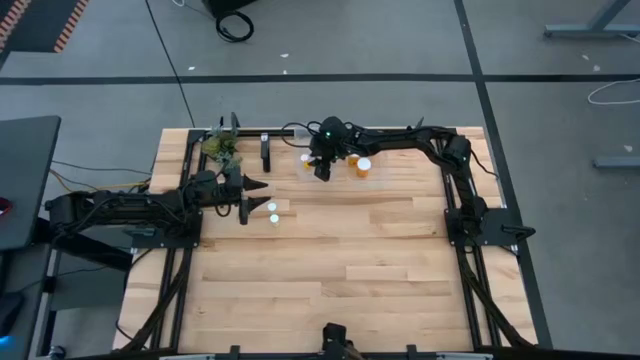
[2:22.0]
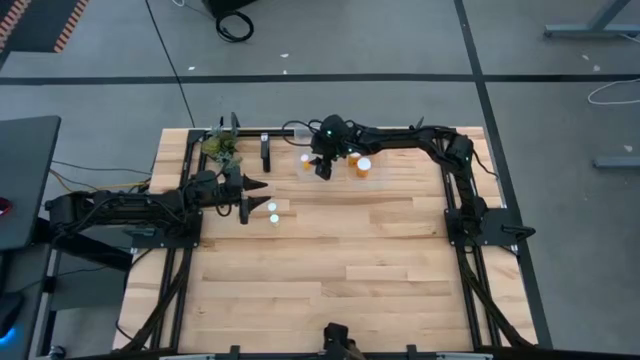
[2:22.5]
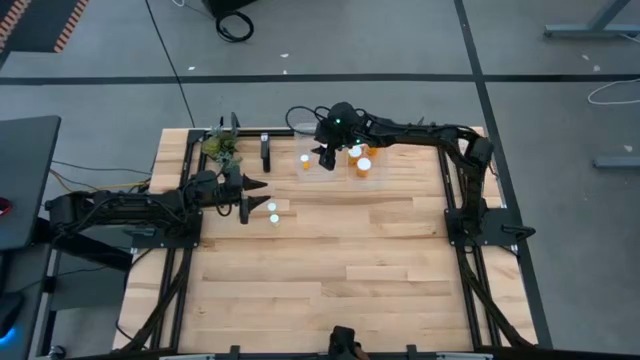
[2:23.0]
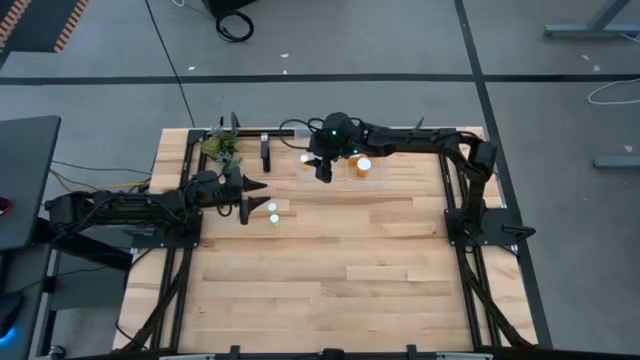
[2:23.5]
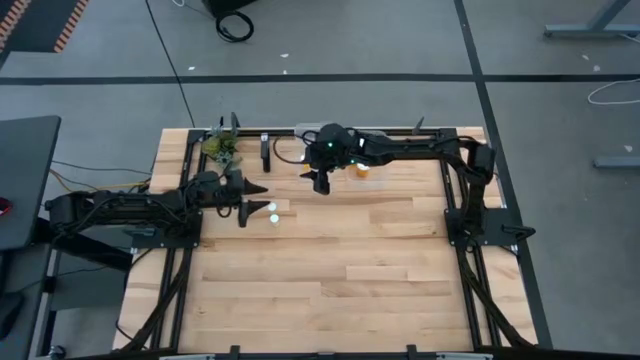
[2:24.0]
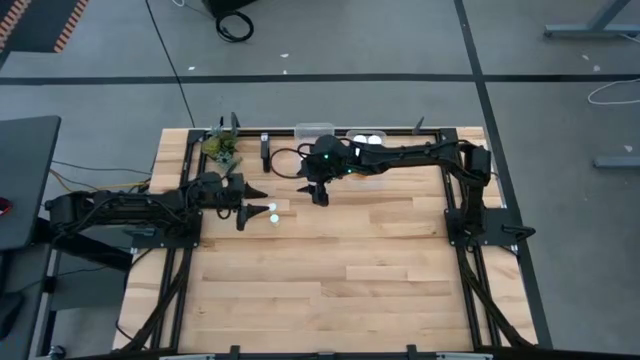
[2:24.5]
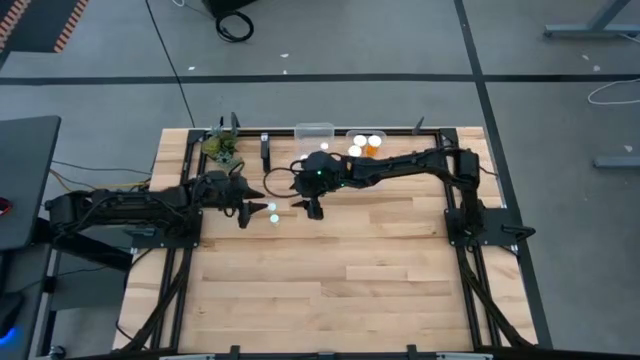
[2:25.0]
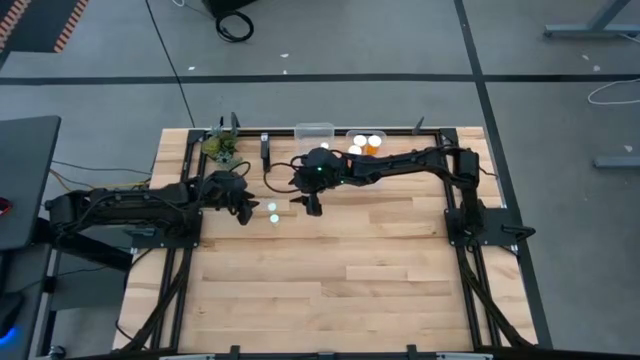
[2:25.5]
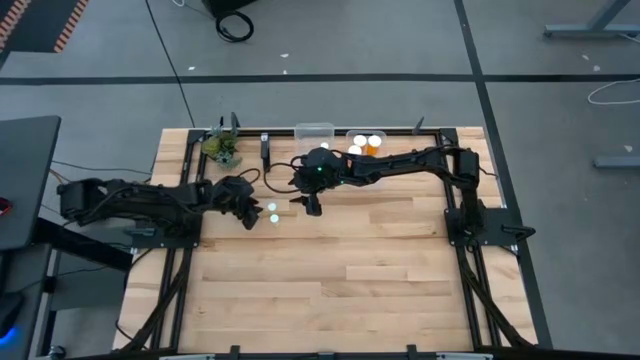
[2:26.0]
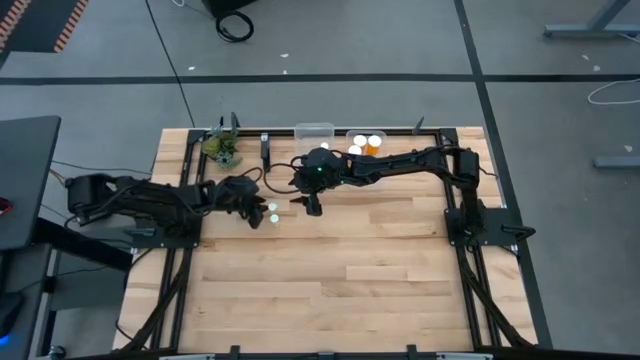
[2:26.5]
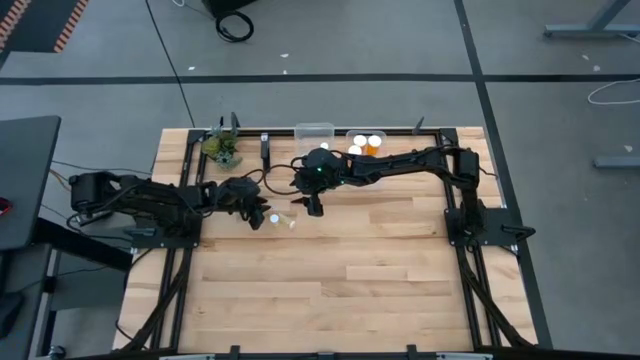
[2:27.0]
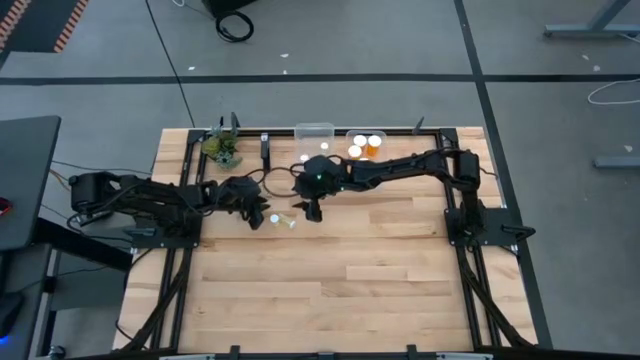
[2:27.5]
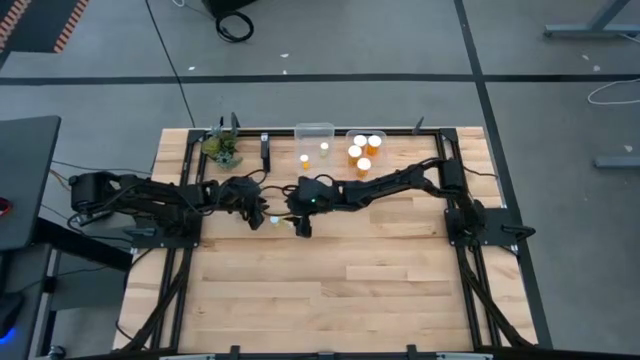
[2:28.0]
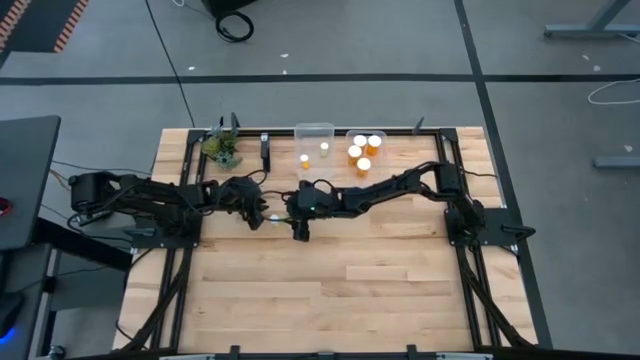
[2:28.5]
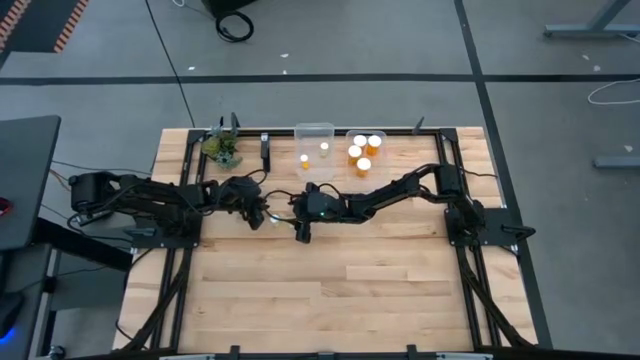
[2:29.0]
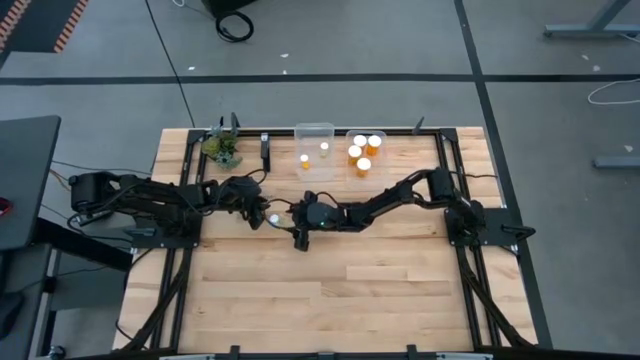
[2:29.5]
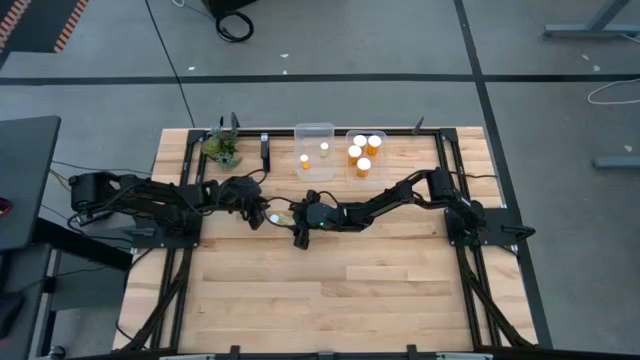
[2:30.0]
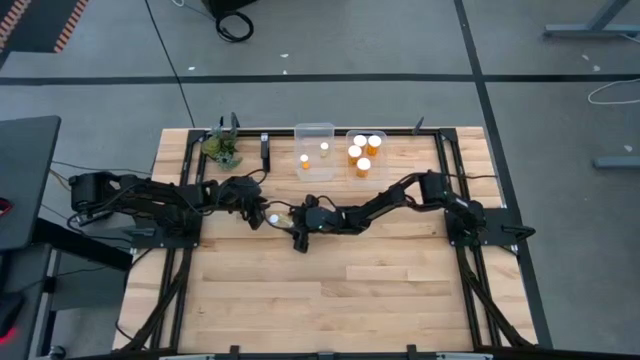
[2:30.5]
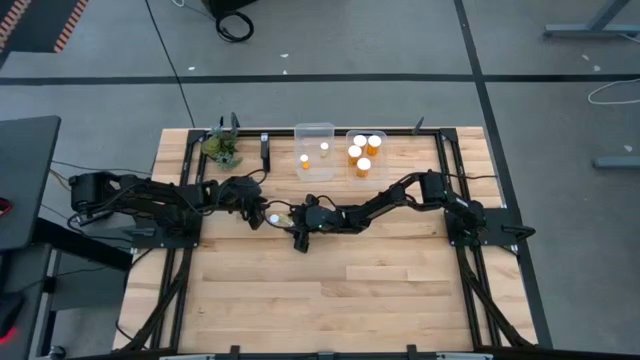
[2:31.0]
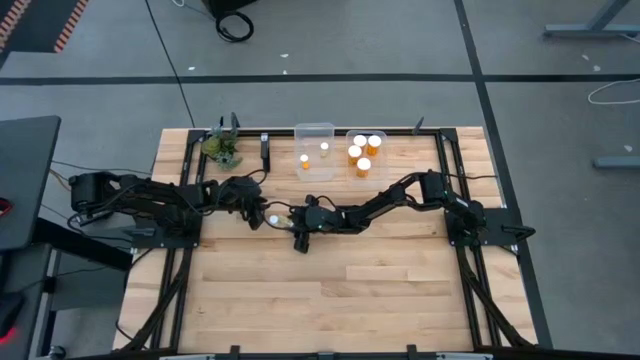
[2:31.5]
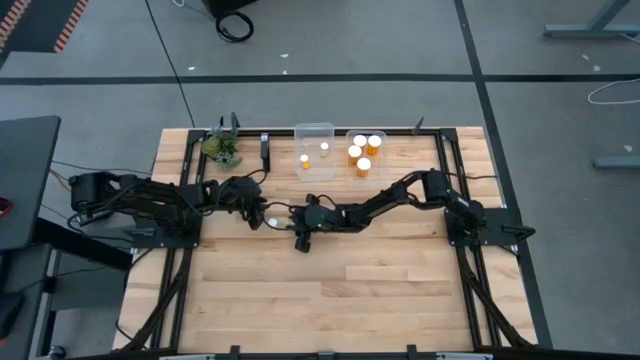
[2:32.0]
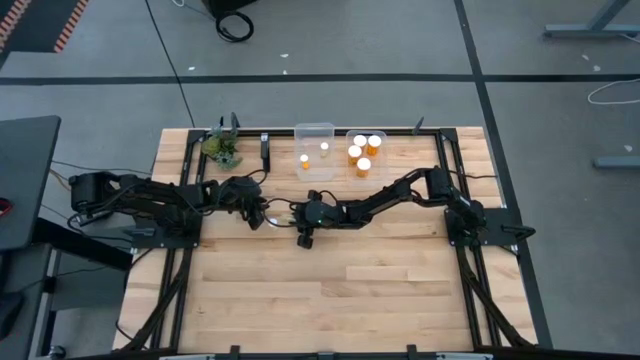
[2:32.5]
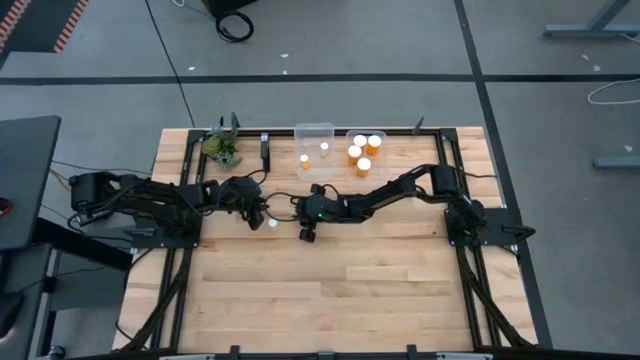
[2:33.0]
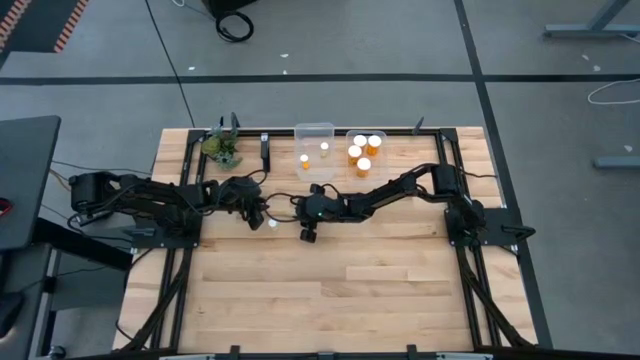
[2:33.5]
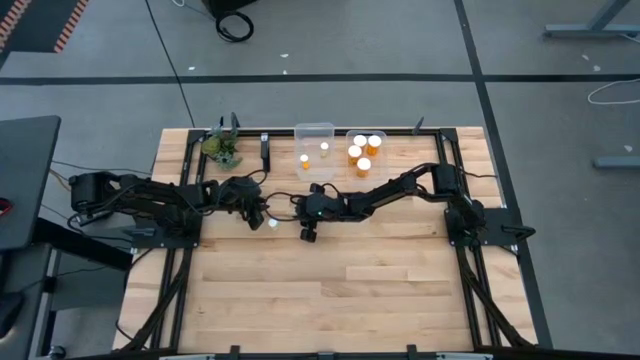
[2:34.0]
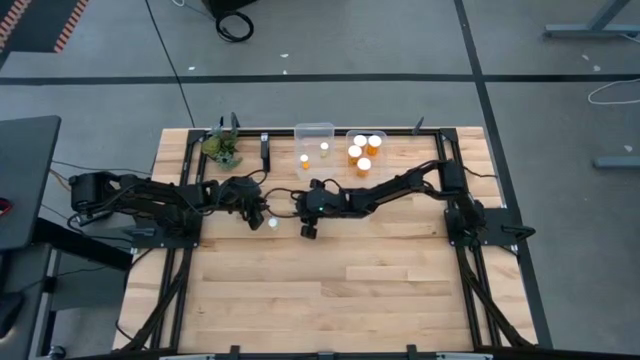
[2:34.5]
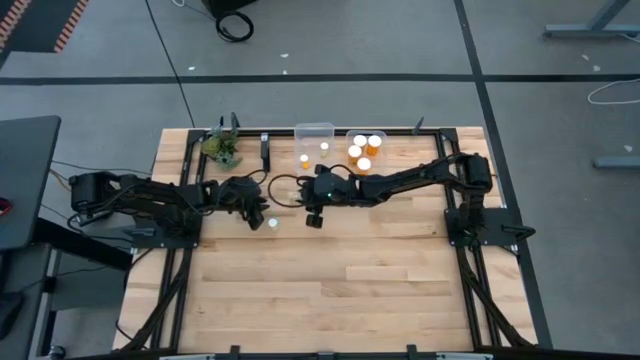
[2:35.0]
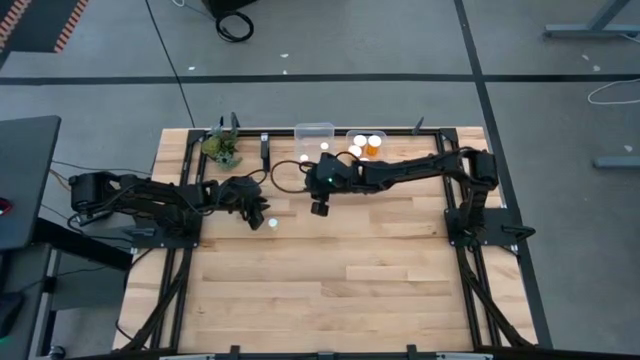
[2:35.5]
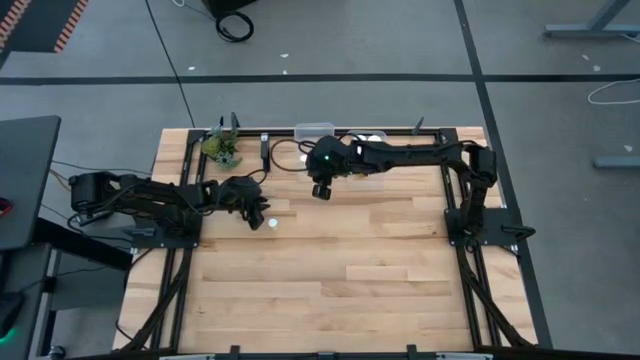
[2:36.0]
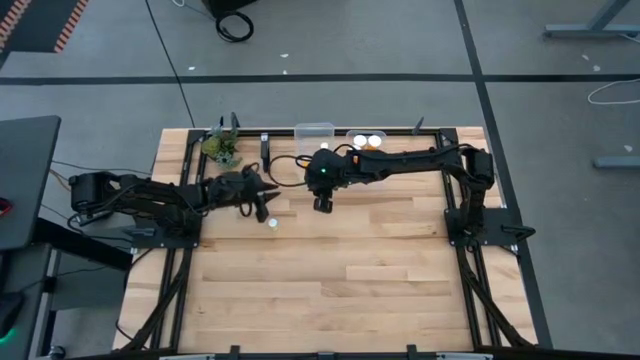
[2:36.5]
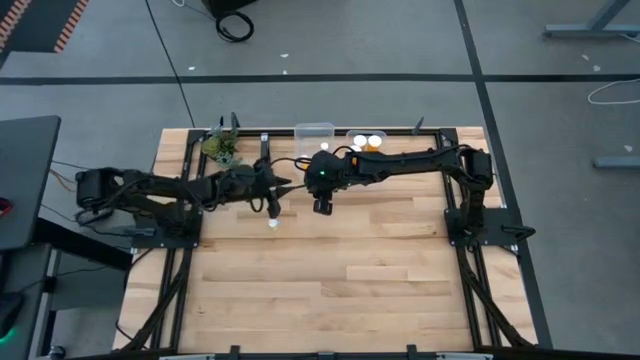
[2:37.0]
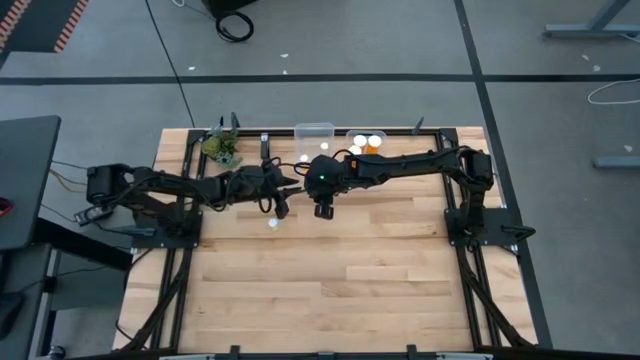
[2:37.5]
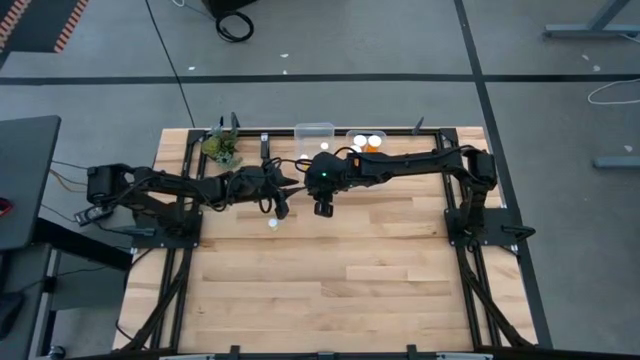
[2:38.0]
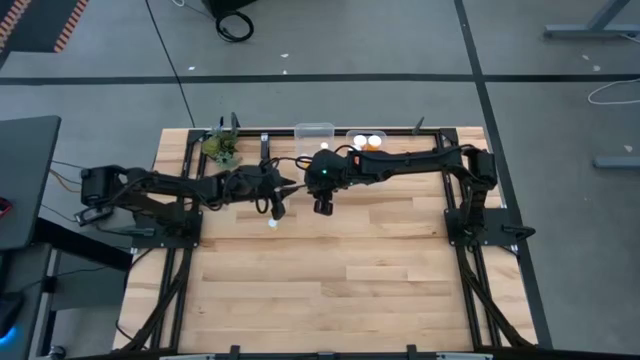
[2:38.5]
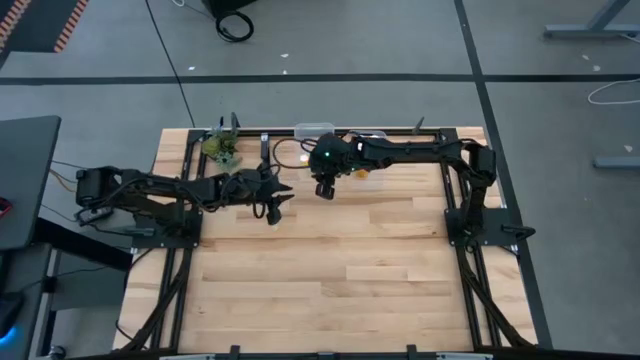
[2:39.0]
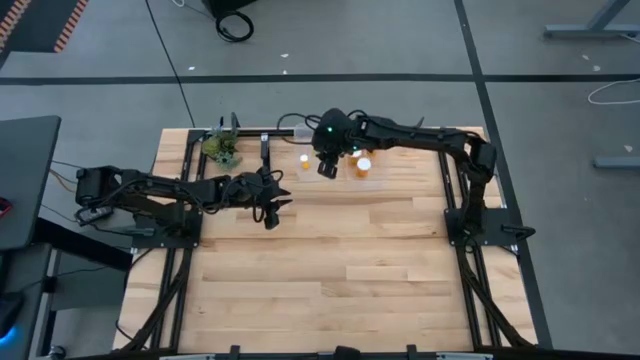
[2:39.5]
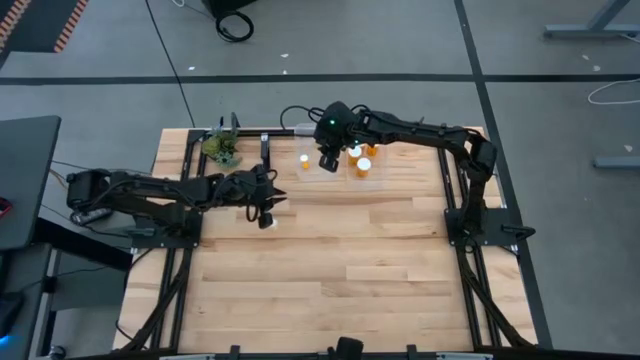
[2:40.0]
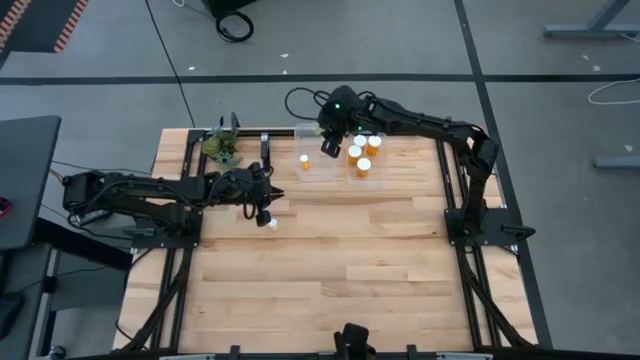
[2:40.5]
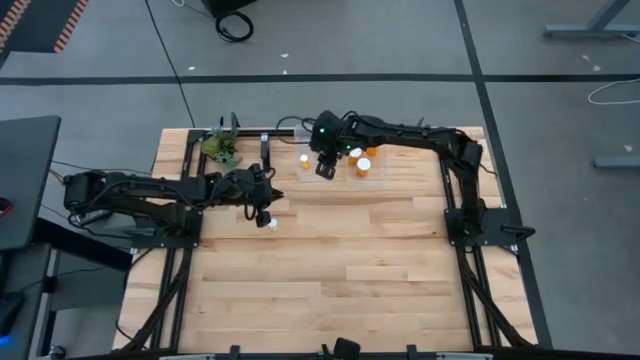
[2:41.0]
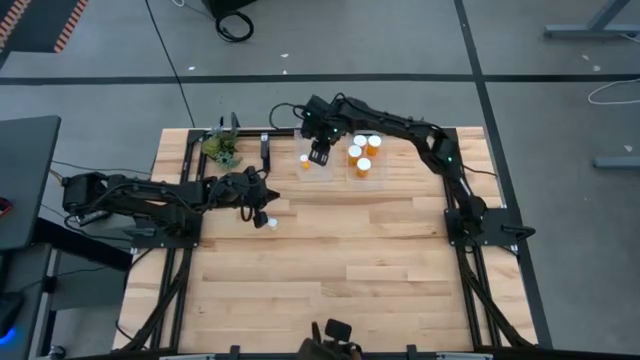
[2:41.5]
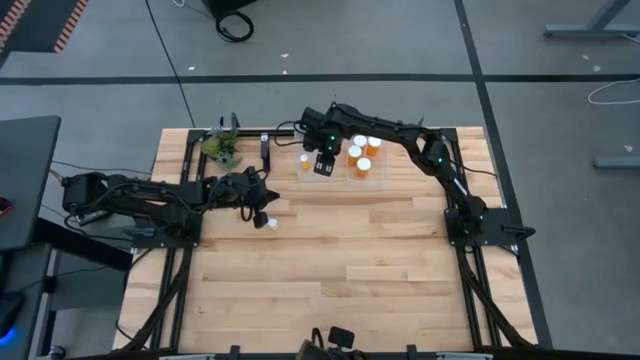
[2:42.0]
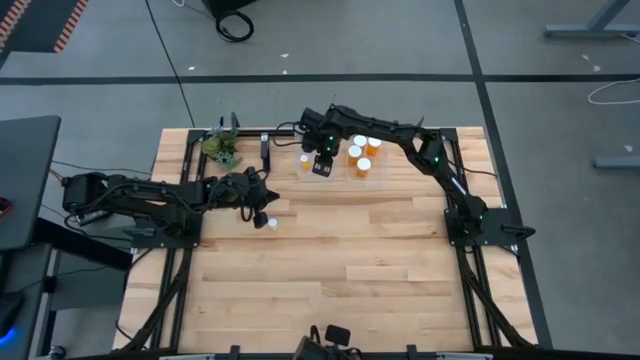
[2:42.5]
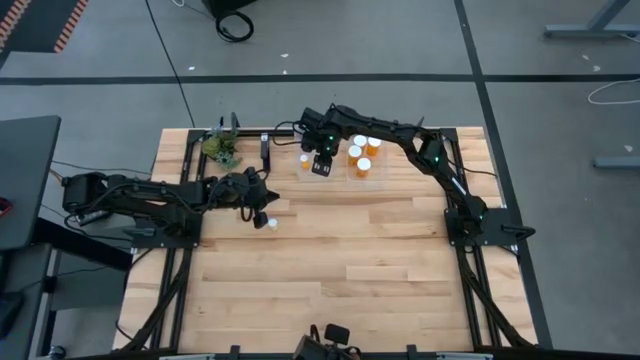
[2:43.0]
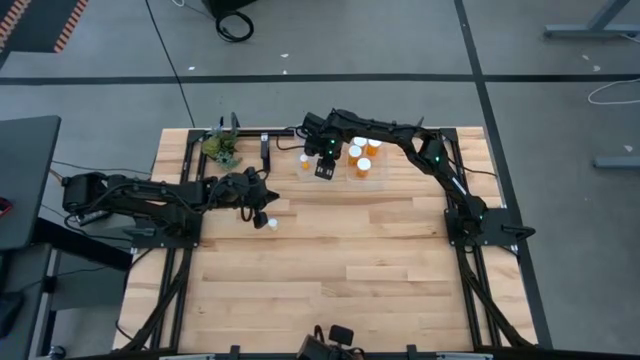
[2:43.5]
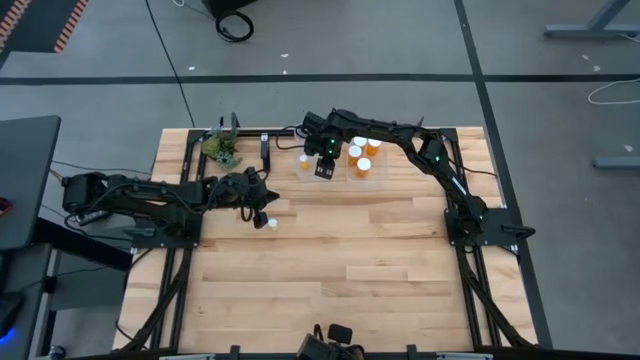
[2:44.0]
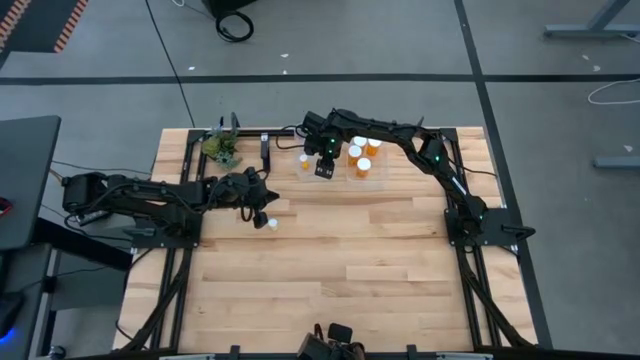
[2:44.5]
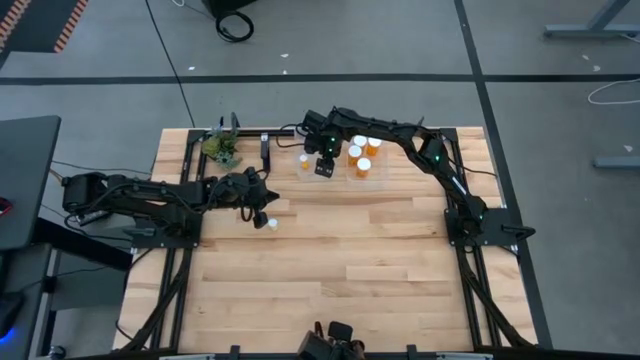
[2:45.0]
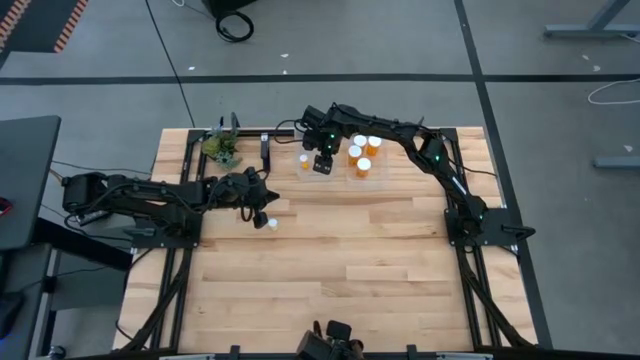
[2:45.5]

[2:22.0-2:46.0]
Task: Pick and place medicine bottles into bin by pill shape (circle, oval)
Put the top small yellow pill into the transparent bin
